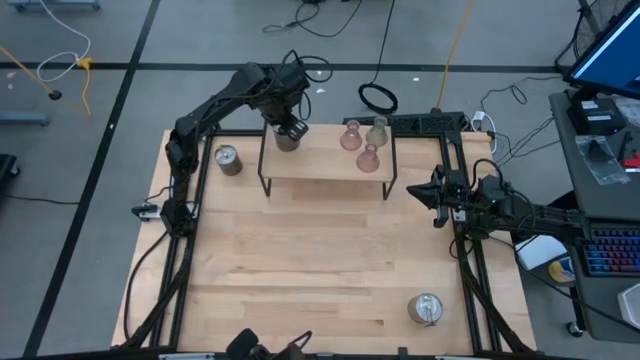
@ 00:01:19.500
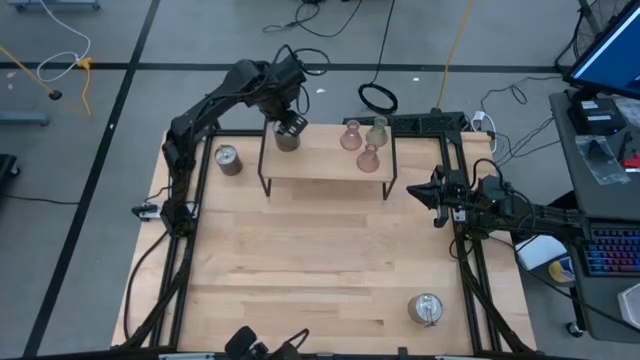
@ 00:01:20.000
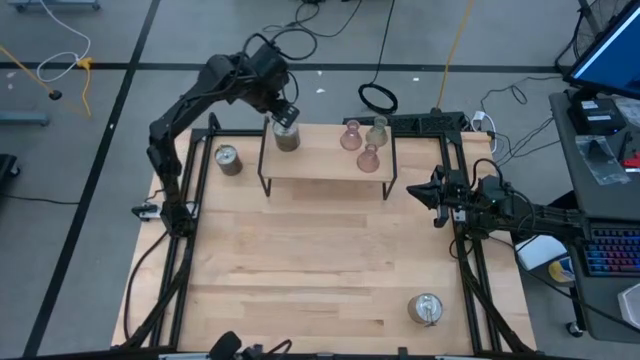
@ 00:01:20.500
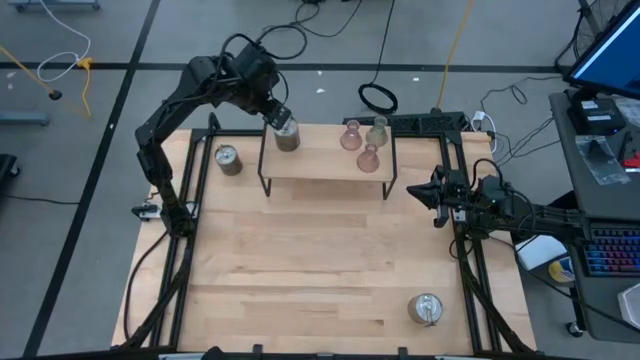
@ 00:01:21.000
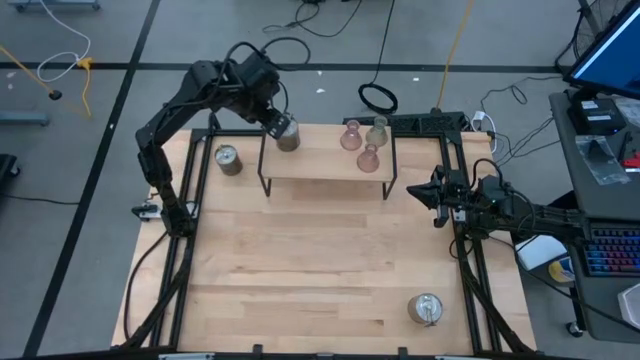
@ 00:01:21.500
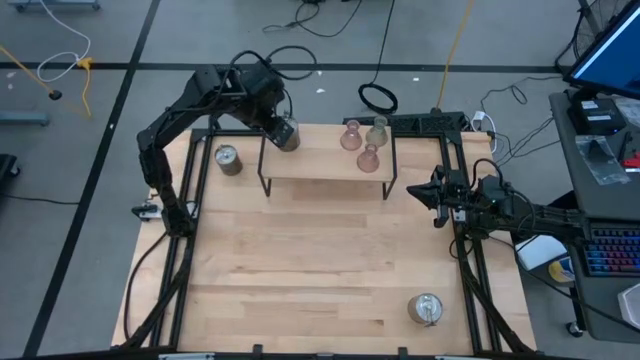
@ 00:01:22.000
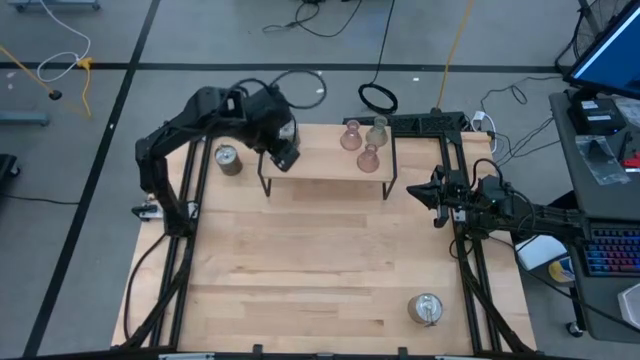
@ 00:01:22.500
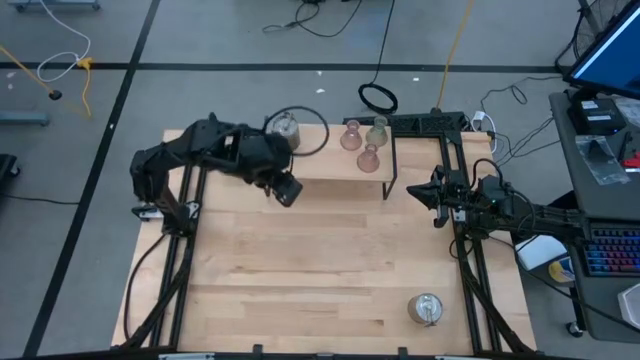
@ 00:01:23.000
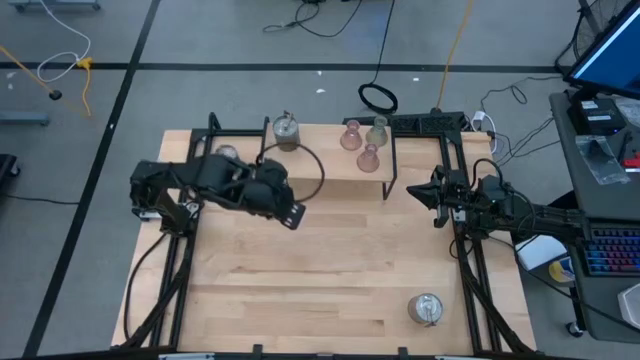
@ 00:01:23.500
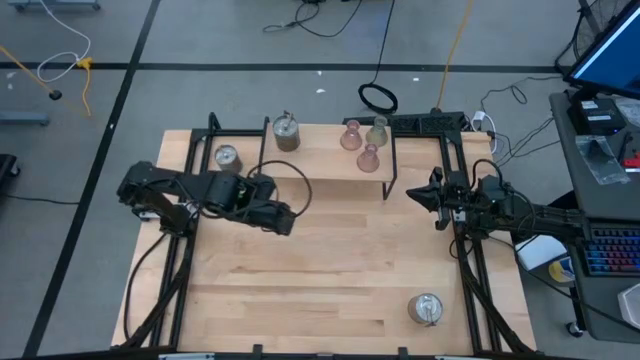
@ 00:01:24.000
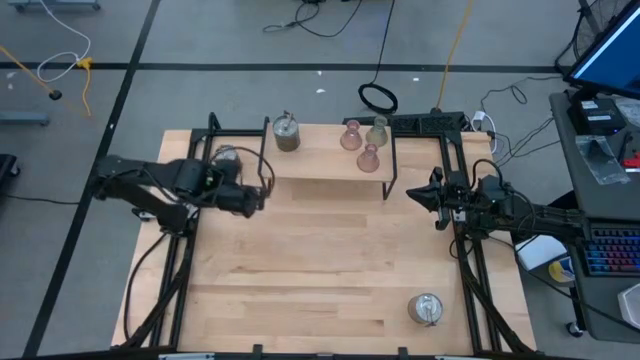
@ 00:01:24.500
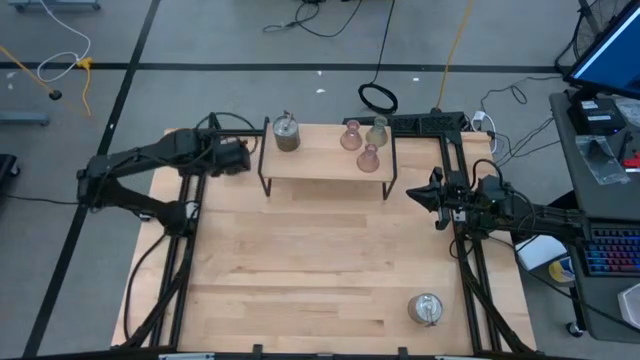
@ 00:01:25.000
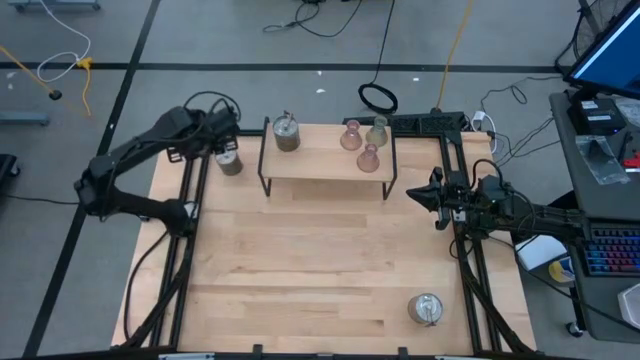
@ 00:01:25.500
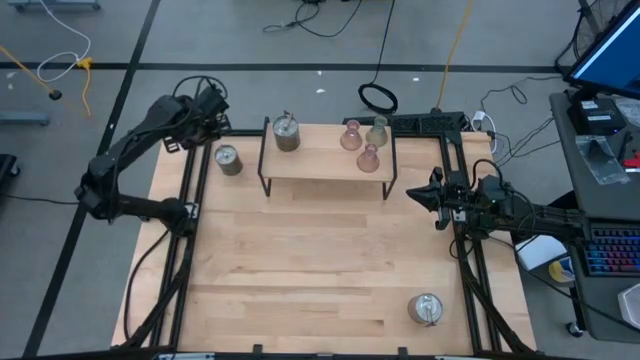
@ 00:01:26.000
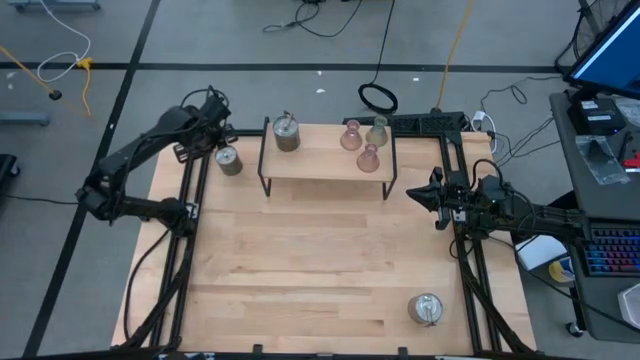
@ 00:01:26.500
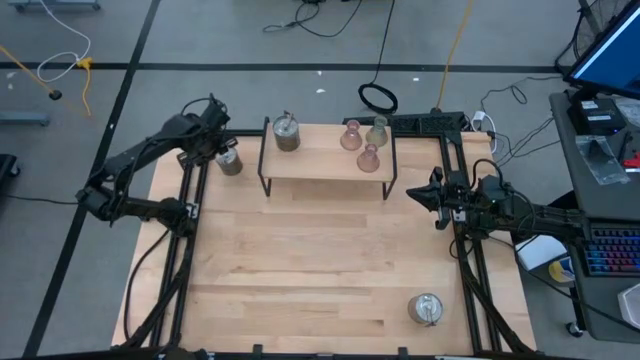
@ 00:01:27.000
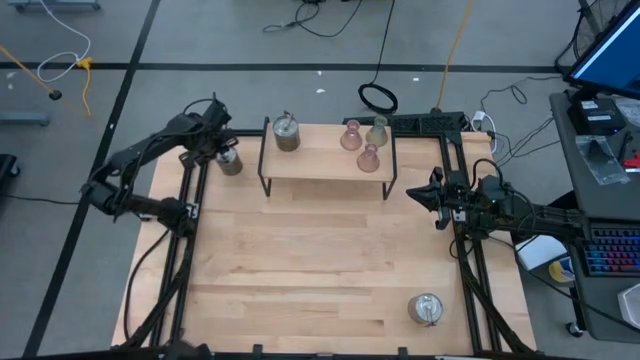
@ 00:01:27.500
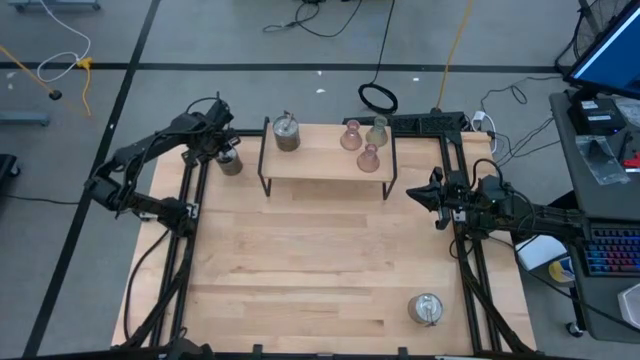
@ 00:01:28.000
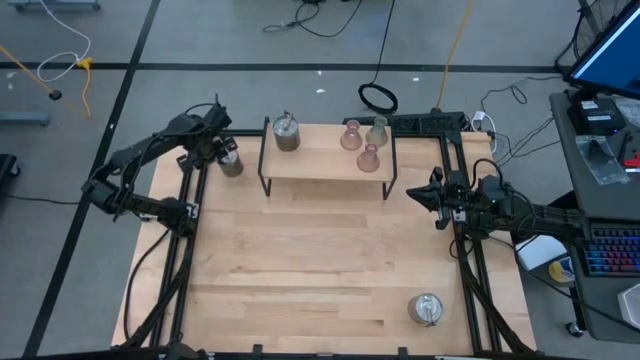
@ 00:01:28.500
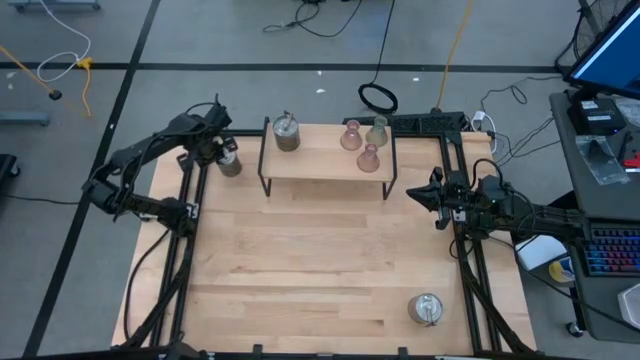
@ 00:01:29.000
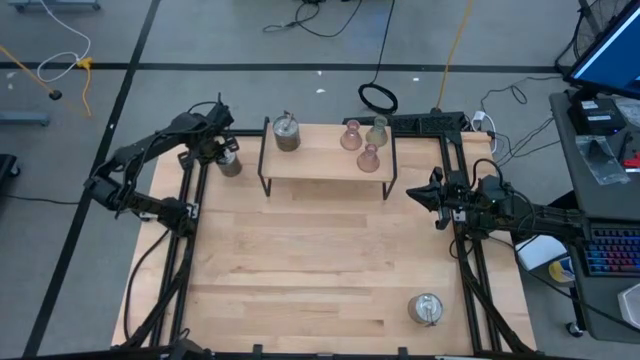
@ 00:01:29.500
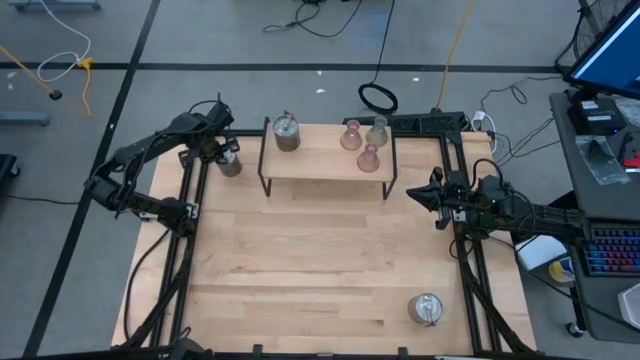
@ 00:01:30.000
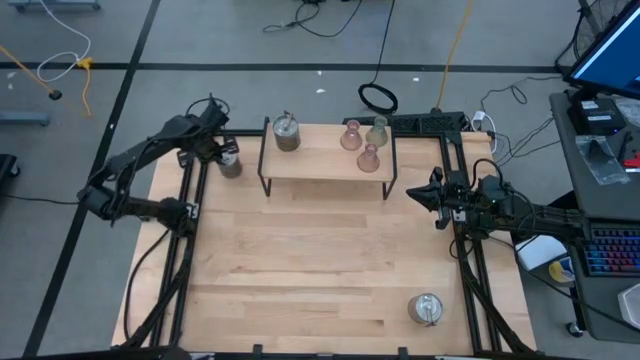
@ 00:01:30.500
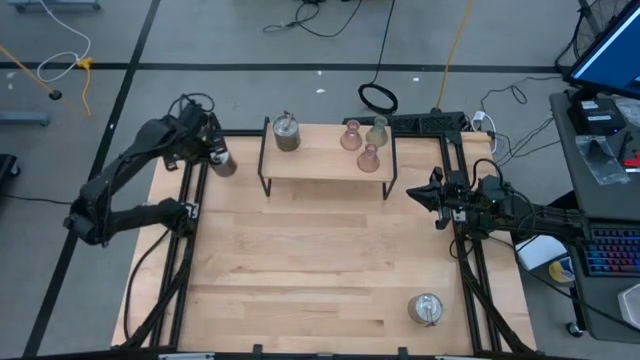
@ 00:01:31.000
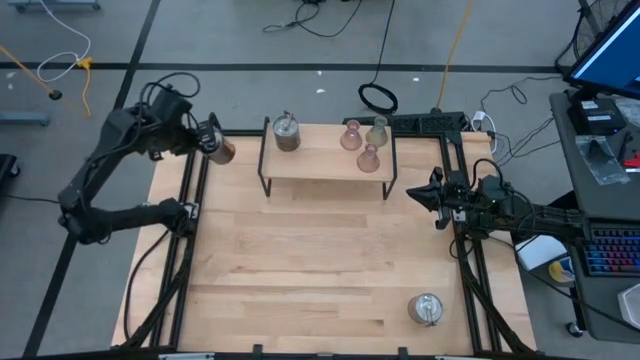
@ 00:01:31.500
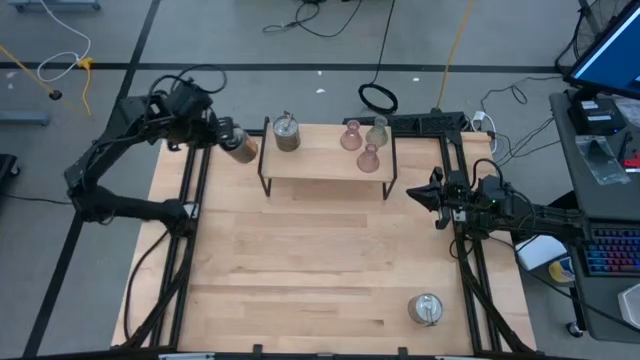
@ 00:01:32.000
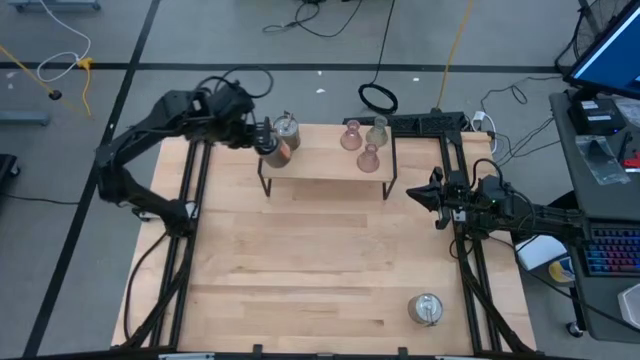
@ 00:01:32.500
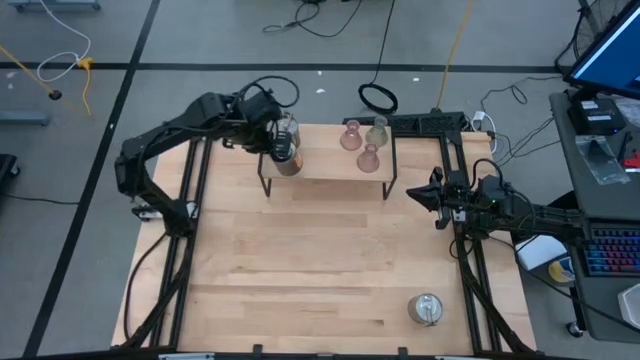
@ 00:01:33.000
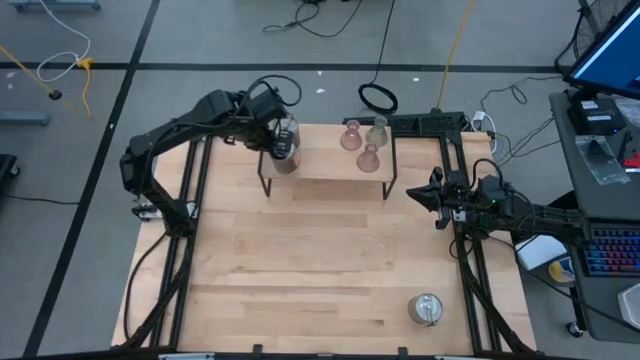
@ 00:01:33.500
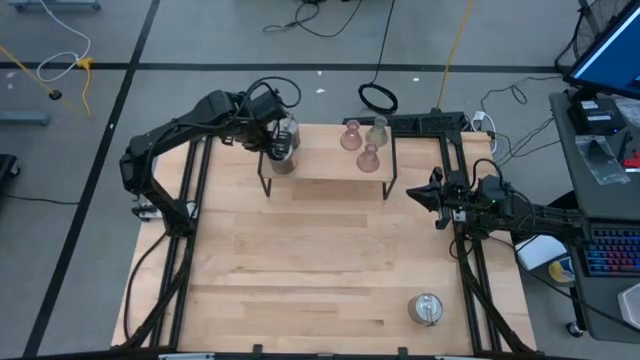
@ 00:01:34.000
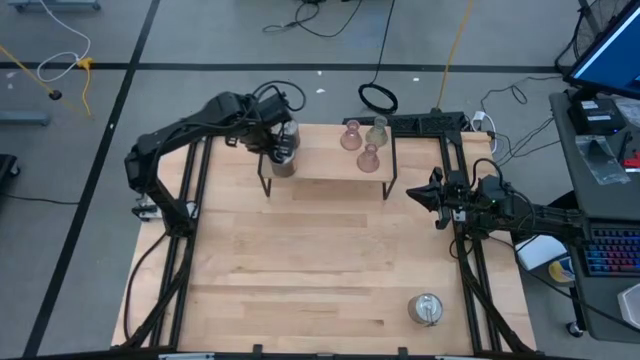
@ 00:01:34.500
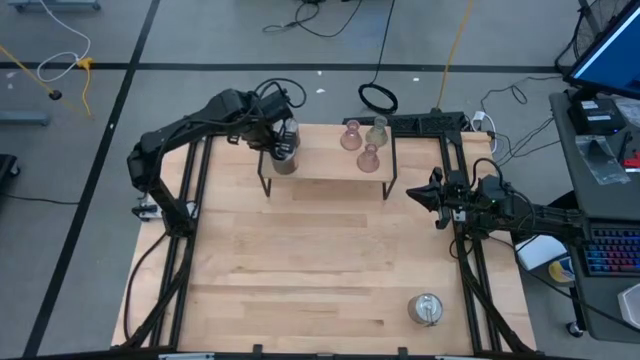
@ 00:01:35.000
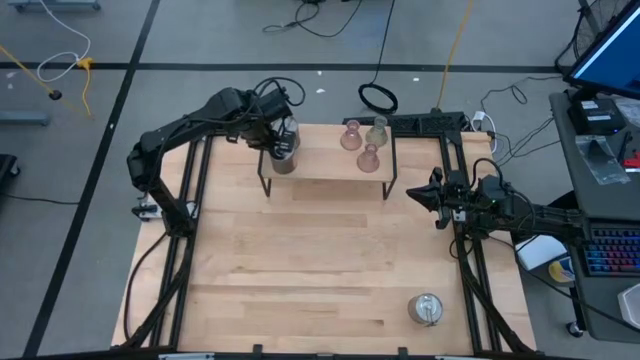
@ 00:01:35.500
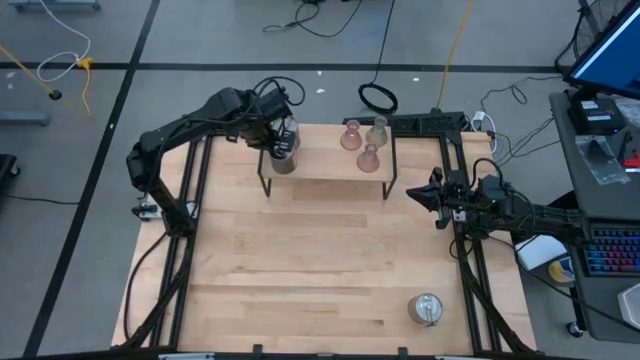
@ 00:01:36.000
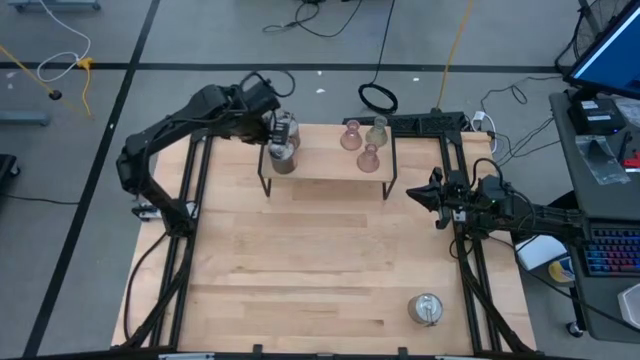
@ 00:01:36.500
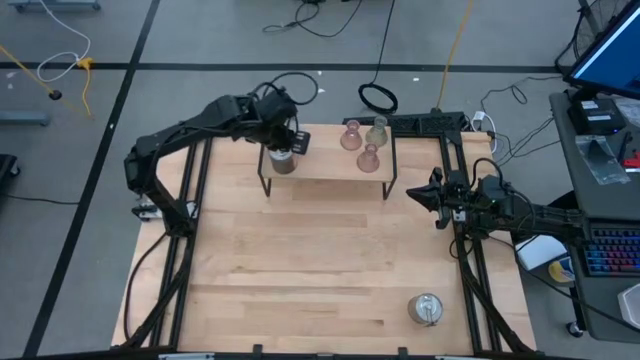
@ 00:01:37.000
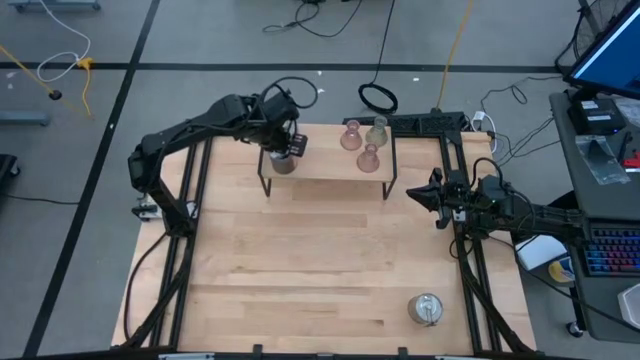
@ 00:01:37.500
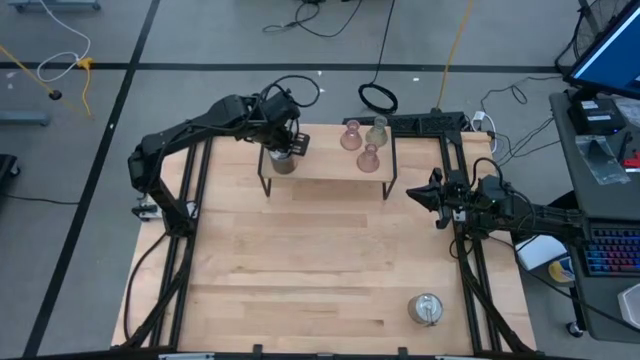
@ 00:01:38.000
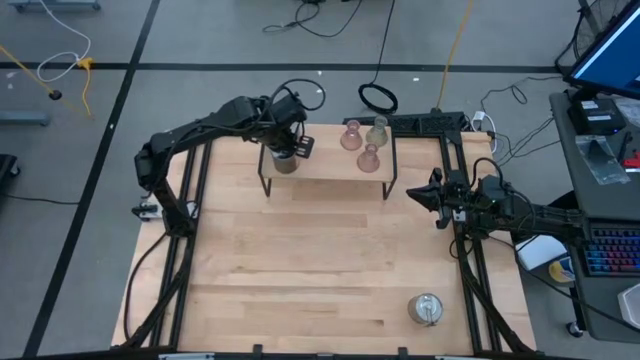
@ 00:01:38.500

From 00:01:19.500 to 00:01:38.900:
Task: Pick & Place candle stick holders
Put the top silver scented candle on the shelf
